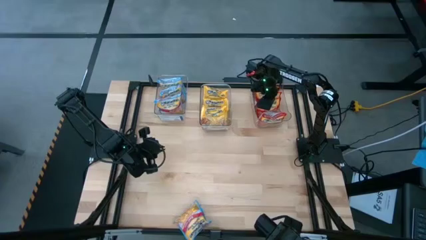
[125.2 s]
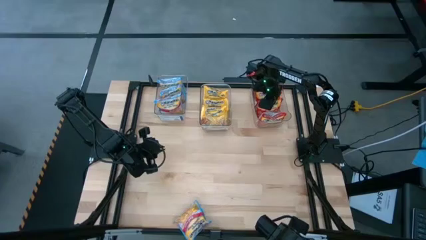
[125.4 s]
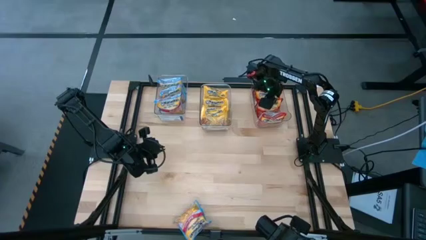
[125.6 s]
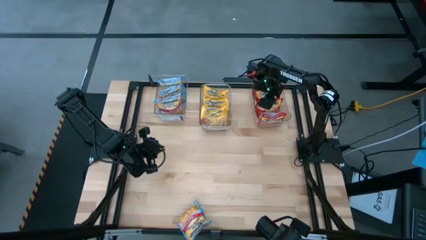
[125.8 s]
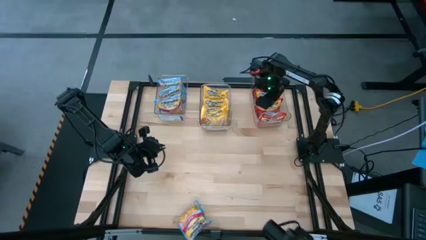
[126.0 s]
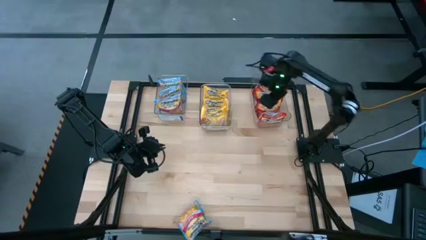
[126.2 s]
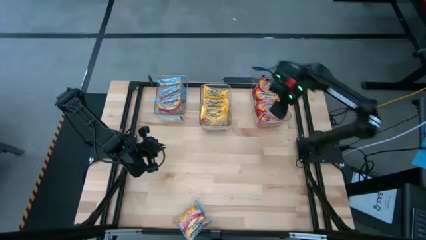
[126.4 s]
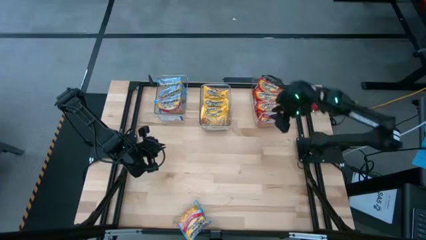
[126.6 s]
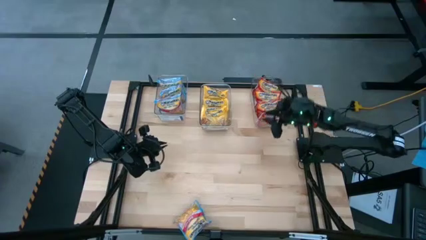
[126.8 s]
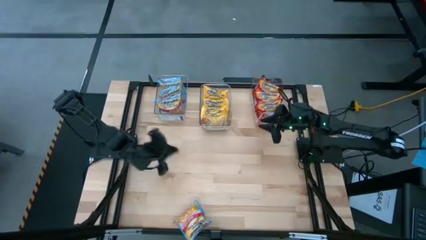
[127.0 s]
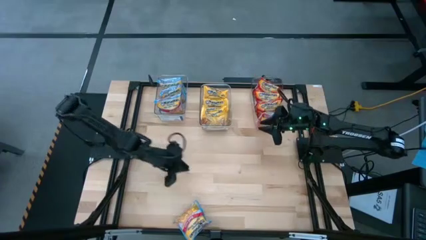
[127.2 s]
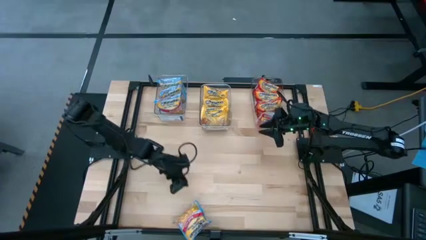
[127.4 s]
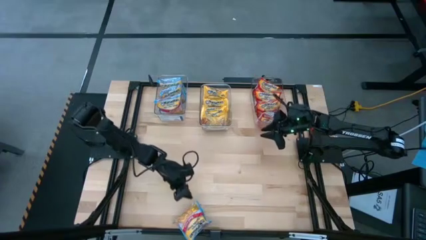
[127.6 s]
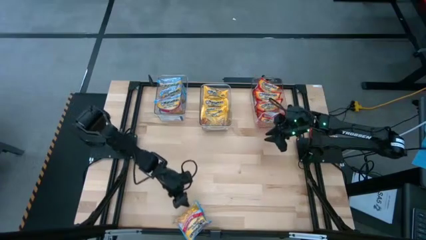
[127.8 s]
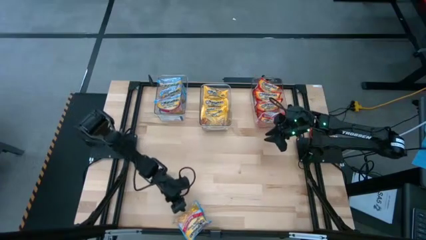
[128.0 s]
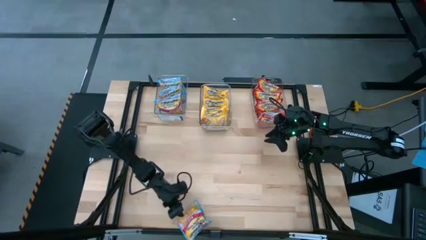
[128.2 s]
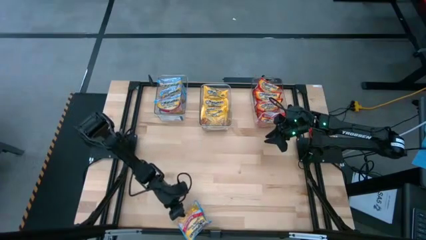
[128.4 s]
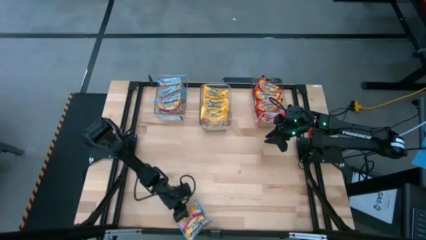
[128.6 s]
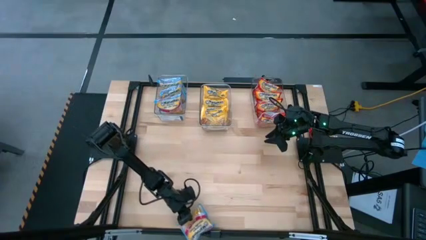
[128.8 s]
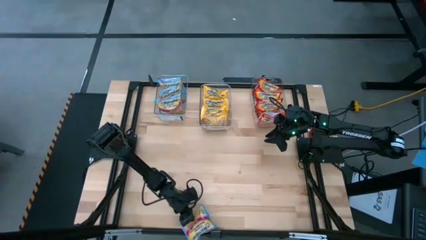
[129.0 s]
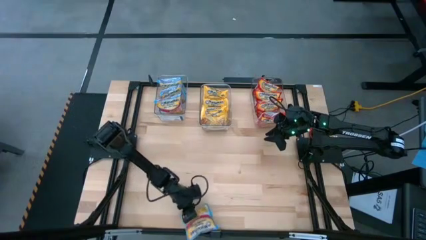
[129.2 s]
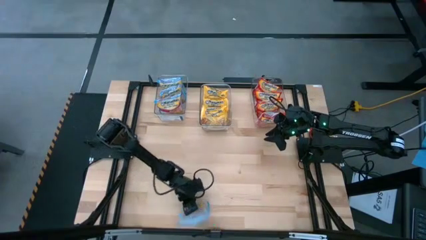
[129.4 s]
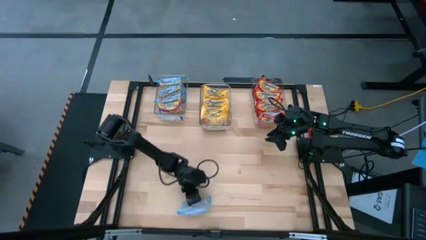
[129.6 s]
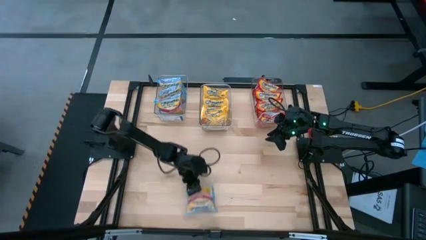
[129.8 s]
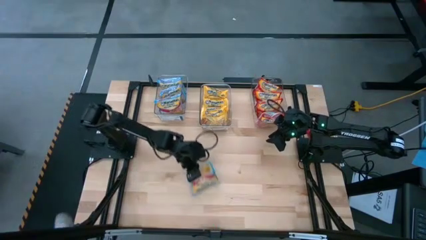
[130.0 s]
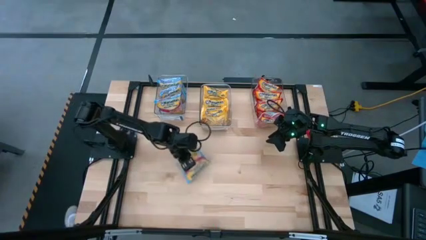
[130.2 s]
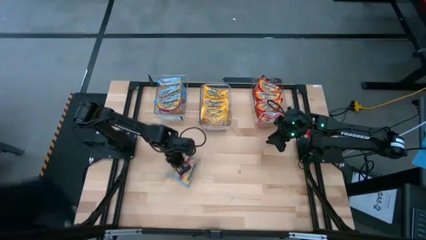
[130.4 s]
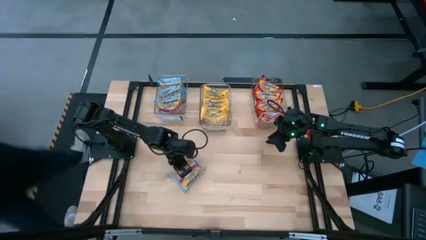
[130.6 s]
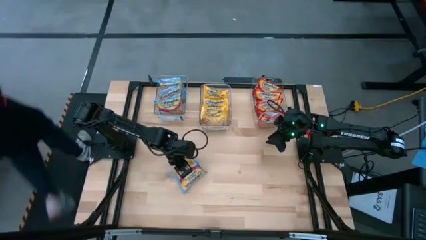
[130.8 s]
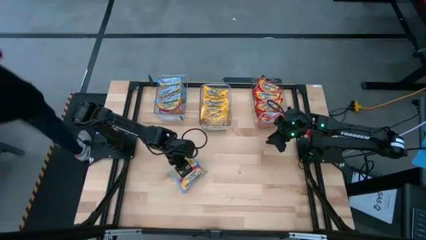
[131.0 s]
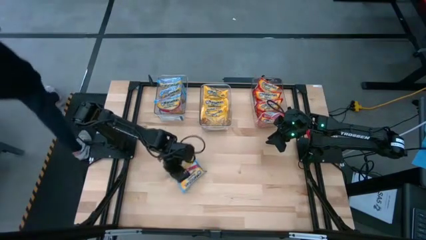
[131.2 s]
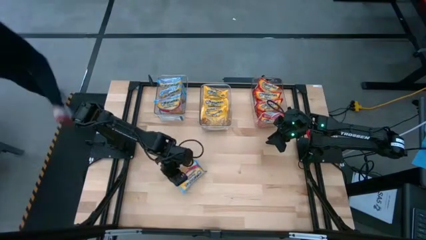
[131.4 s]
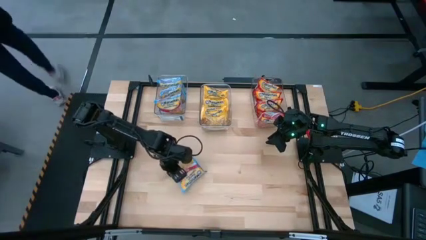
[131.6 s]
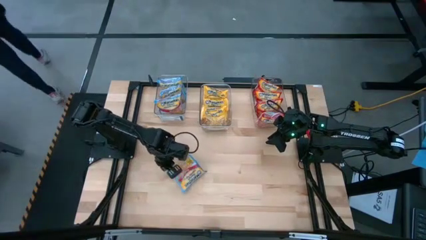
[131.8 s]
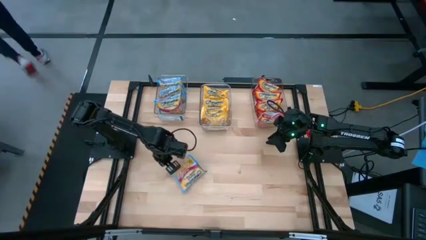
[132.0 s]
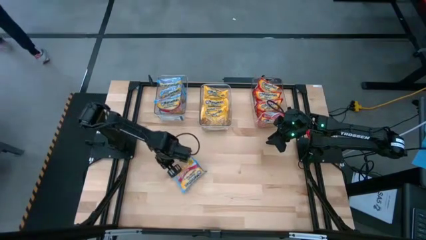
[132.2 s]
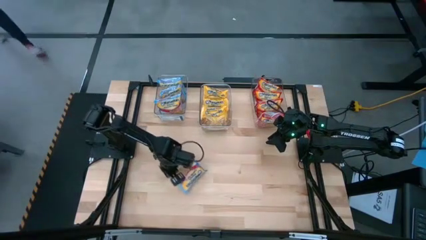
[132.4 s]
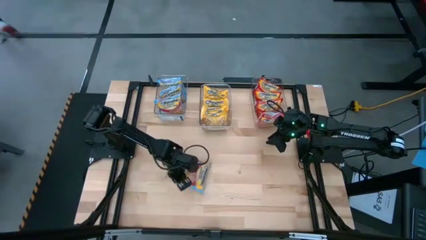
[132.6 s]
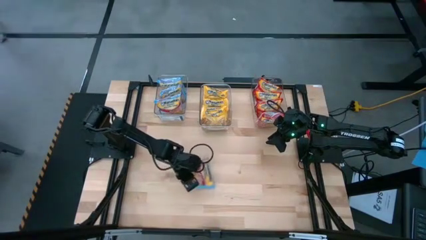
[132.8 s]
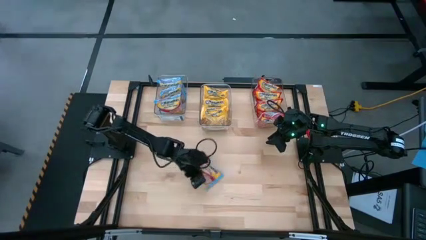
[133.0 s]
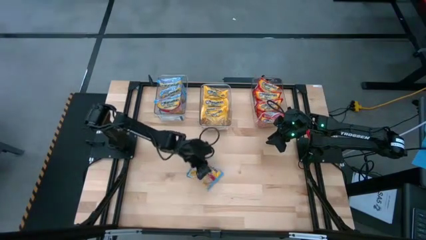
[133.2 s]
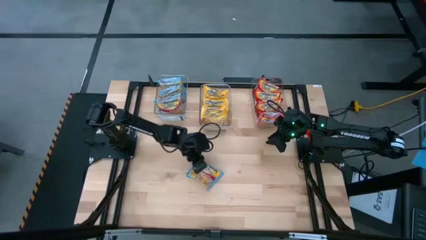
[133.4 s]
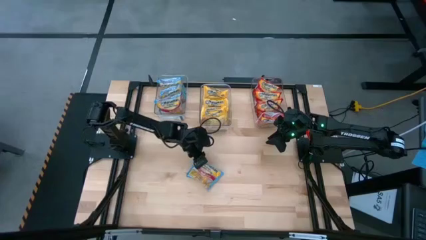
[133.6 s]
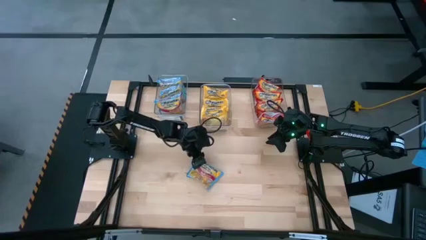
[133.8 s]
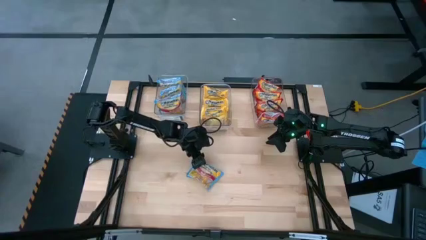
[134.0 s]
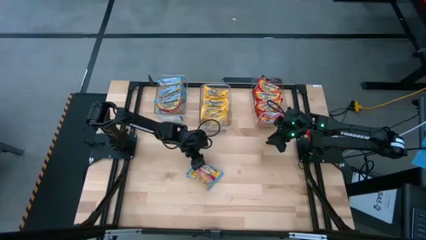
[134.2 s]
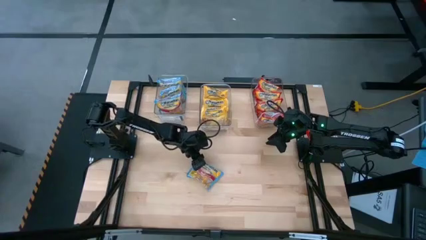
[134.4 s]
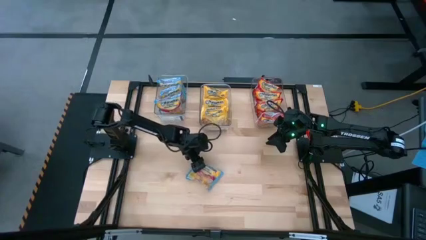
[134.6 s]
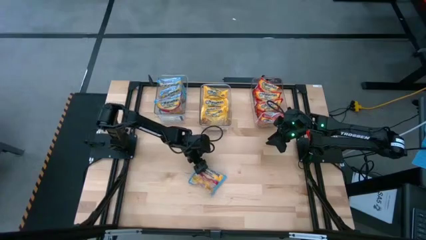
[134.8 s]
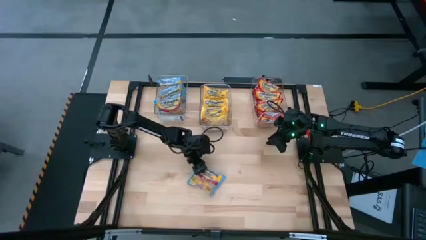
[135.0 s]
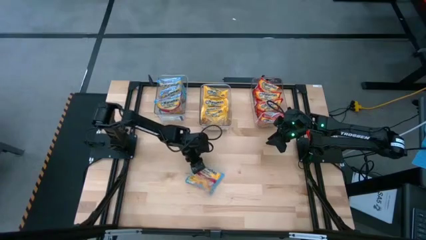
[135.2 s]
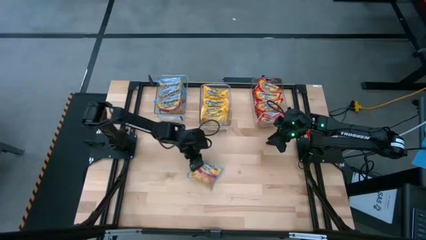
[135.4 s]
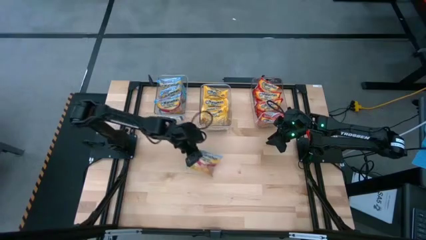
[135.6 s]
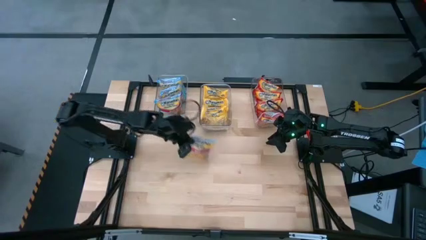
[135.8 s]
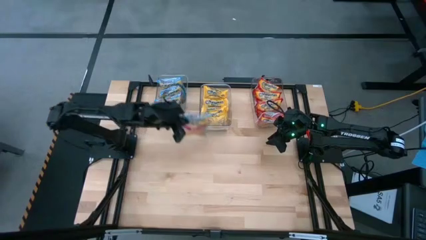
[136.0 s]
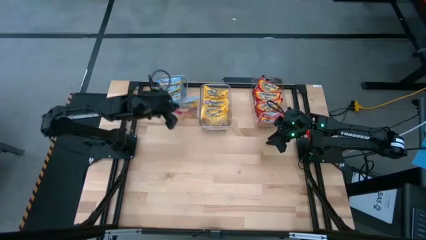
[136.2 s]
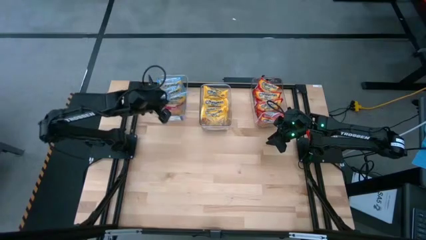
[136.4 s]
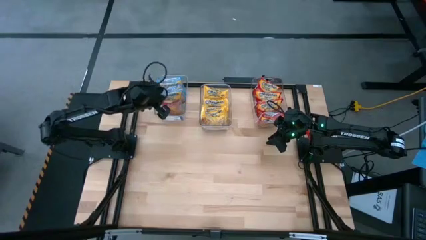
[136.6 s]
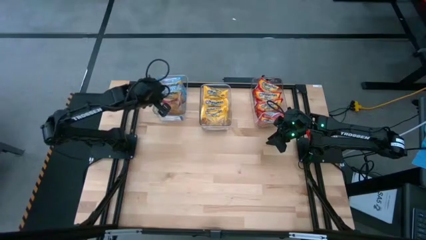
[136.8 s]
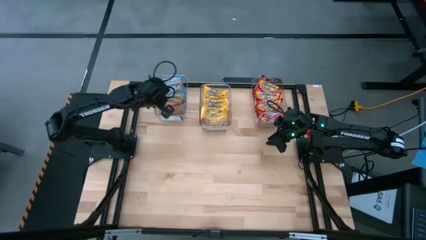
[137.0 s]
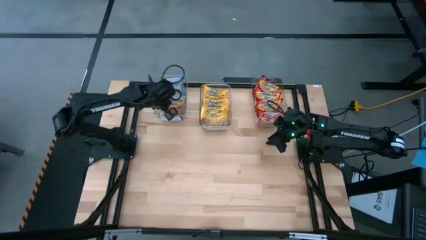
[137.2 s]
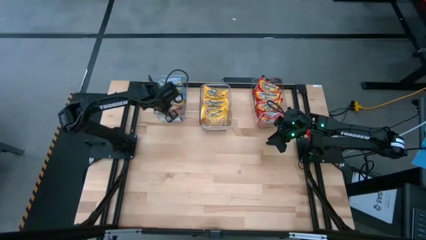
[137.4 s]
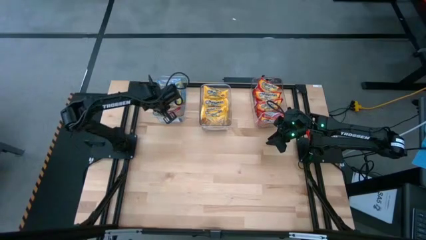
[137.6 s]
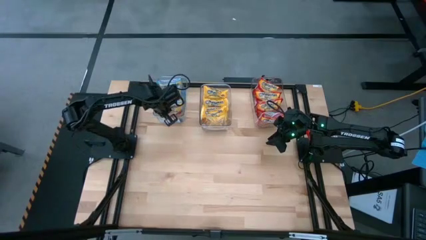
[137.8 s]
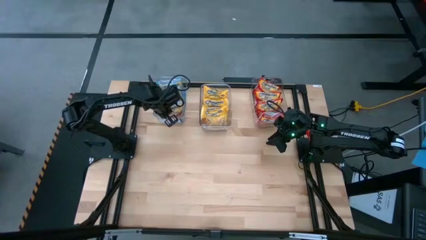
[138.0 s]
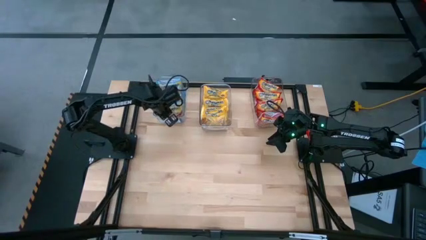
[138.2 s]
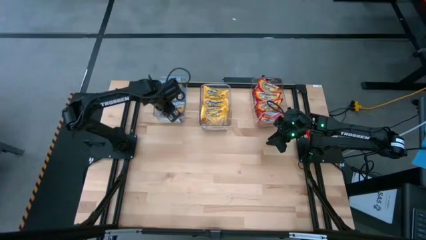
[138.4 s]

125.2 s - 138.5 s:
Task: Sort Maruchan noodles
Put the blue noodle pack into the left transparent bin

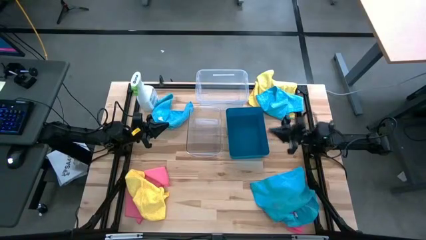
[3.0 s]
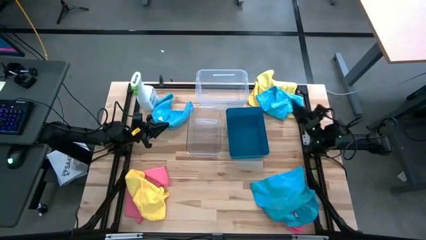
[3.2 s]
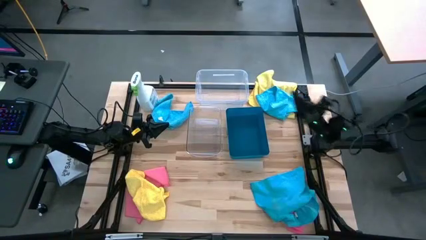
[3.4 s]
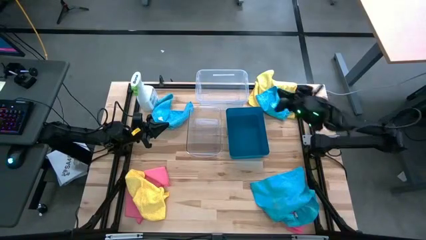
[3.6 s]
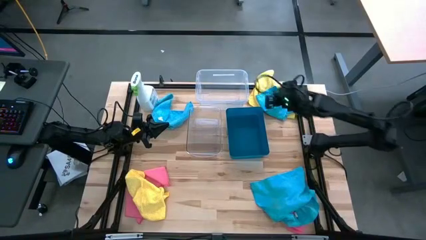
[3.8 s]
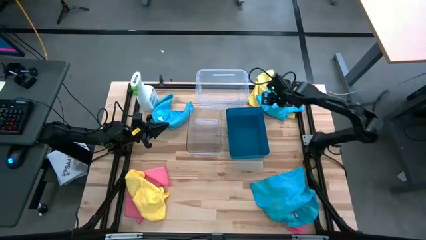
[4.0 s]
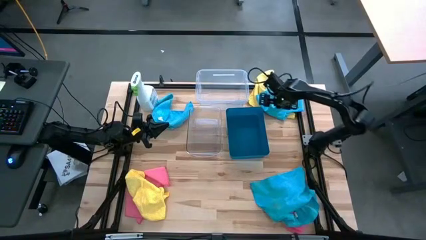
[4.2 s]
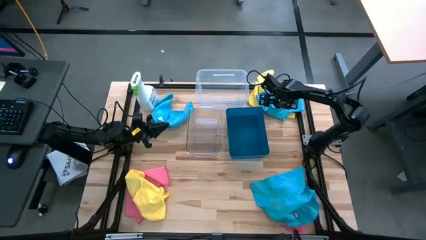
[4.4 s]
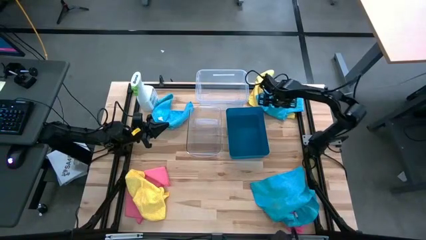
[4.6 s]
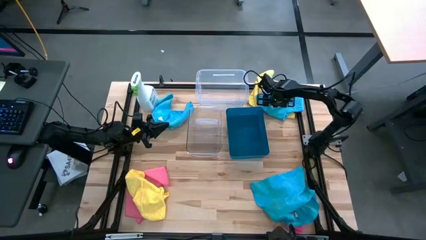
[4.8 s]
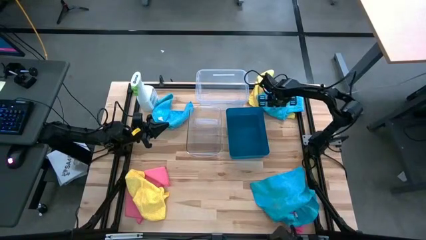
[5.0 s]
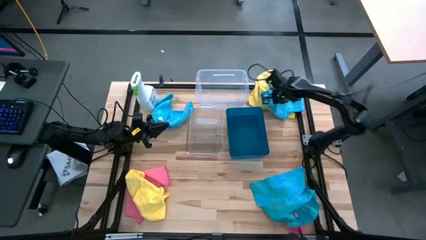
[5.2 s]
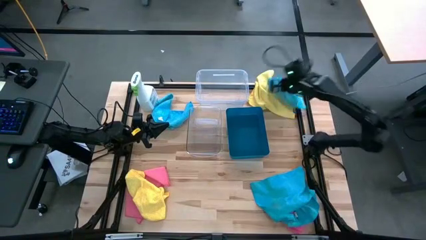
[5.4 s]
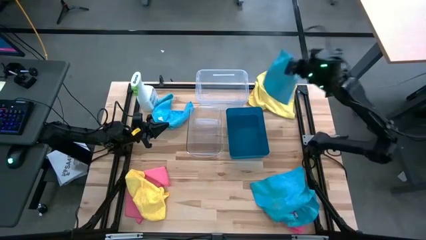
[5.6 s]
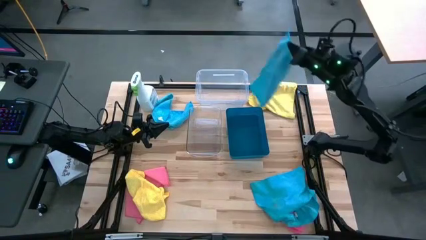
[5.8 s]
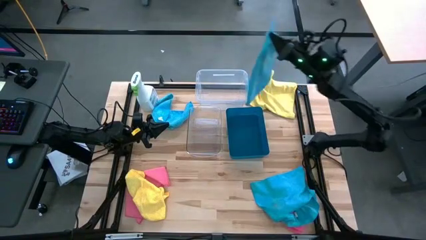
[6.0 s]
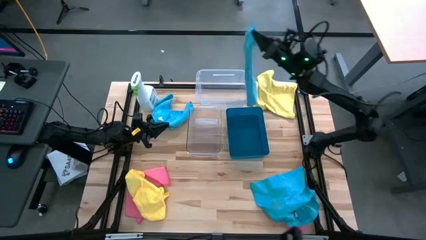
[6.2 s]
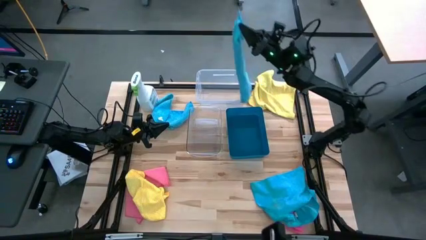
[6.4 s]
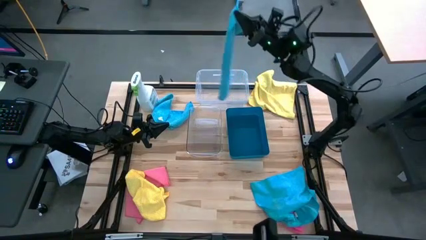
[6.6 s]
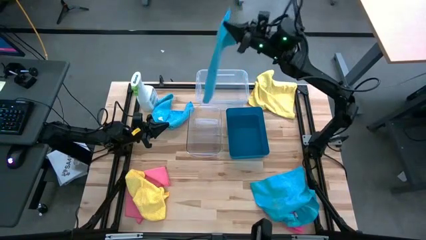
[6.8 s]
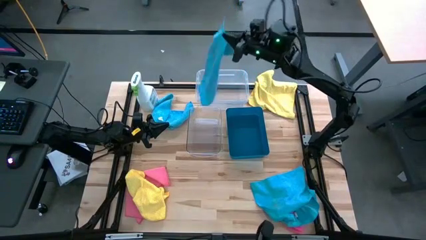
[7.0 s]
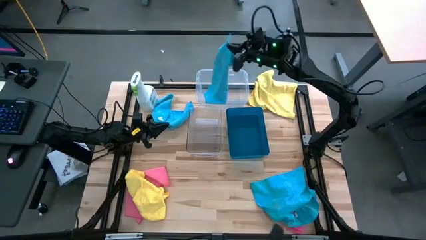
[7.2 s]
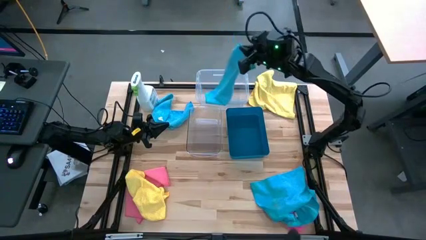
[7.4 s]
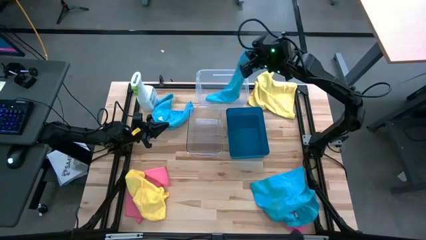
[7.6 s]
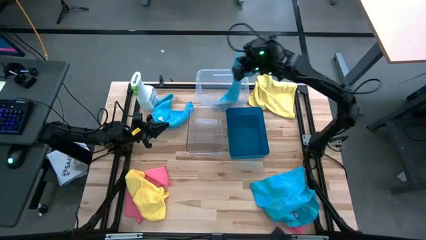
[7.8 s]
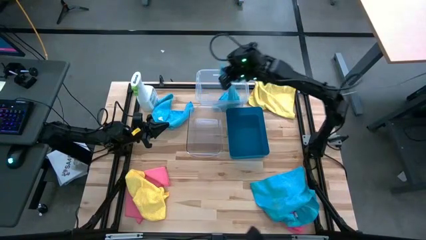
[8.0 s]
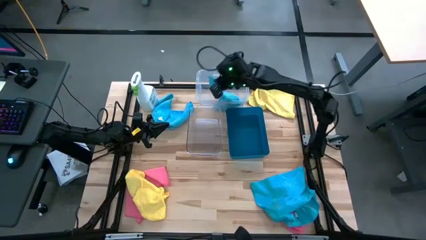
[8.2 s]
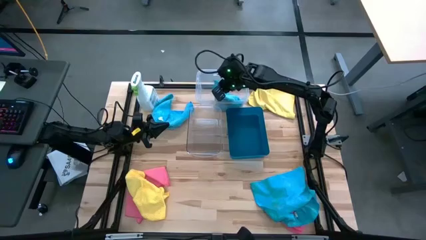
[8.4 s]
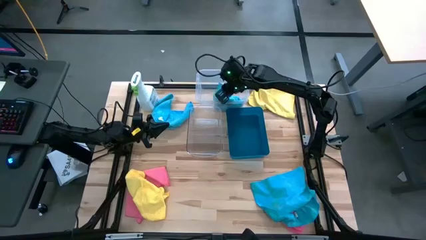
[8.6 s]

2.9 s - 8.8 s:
Task: Sort microfiber towel by color & place in baskets
Put the top right blue towel into the top transparent bin
